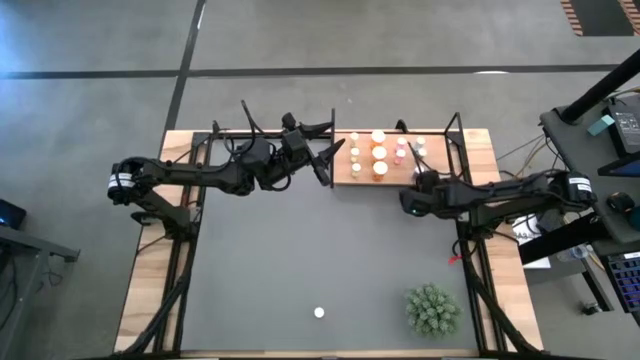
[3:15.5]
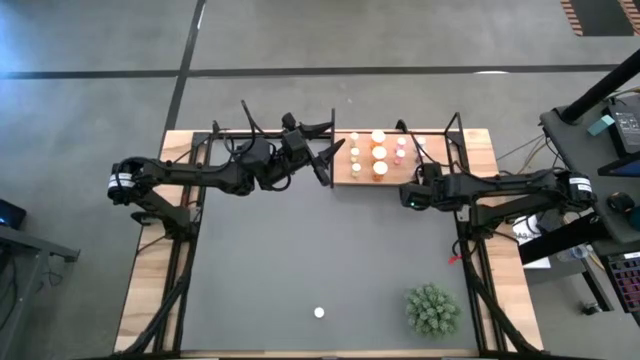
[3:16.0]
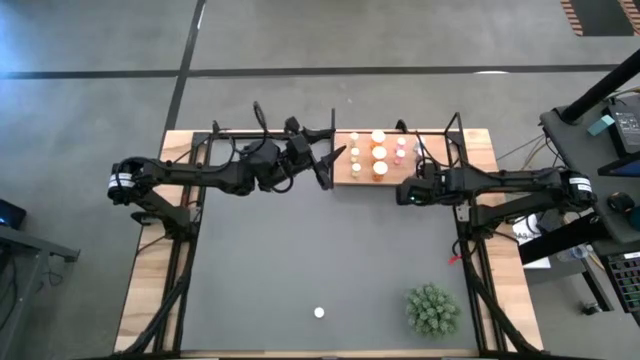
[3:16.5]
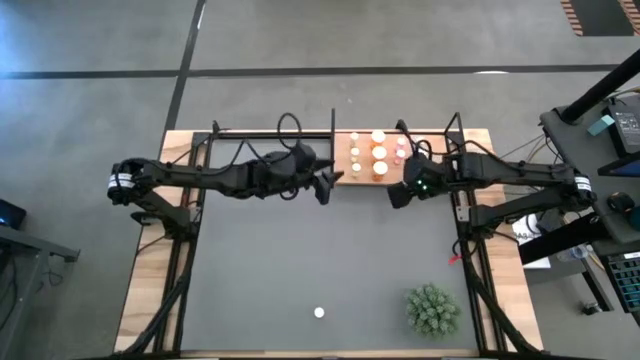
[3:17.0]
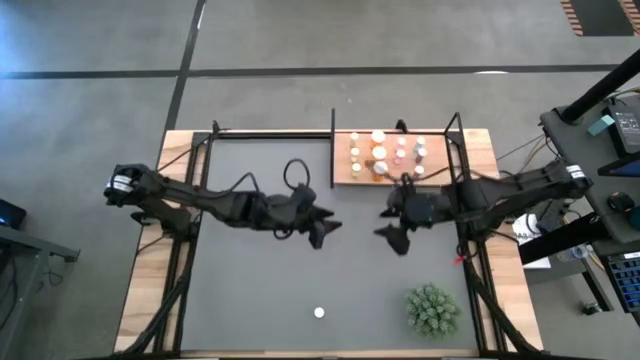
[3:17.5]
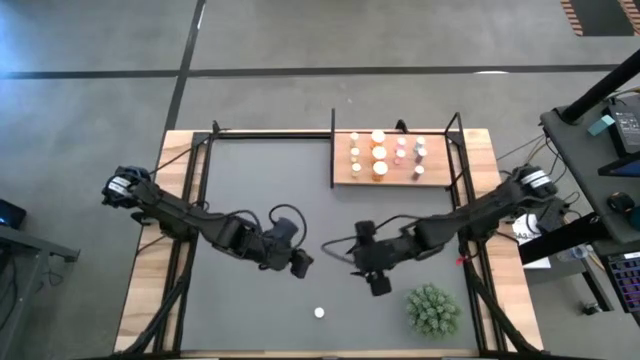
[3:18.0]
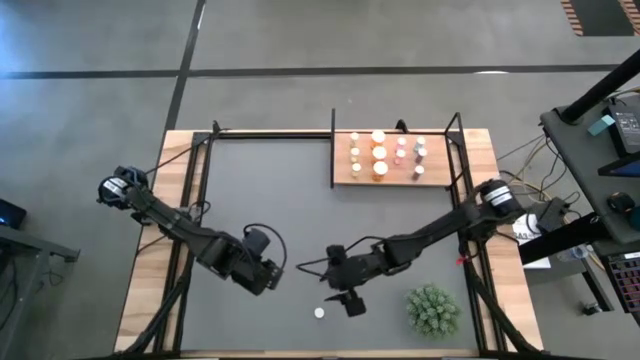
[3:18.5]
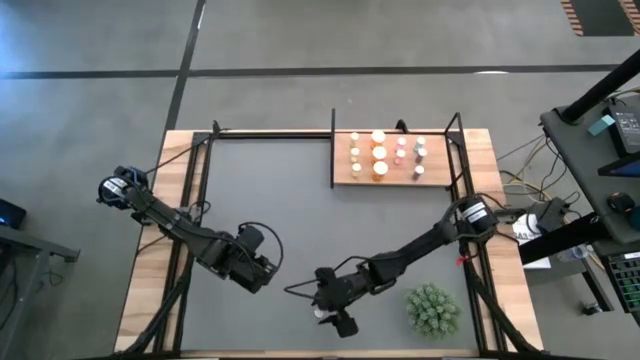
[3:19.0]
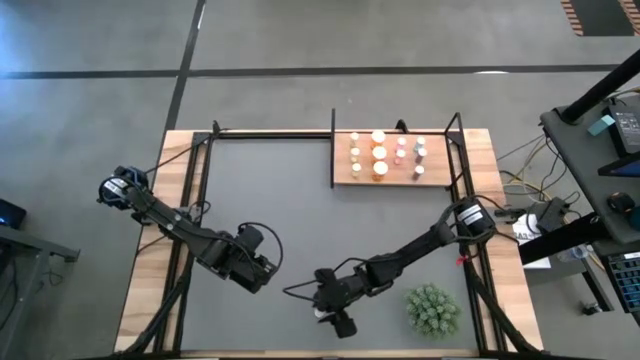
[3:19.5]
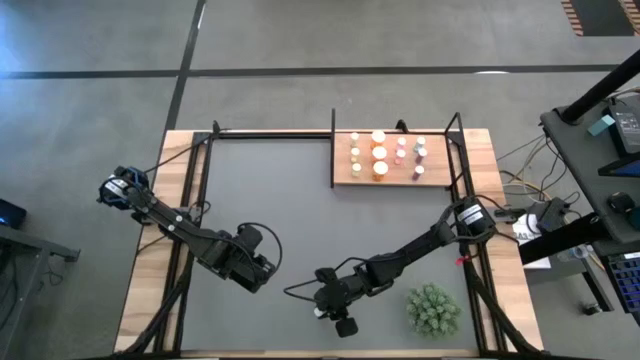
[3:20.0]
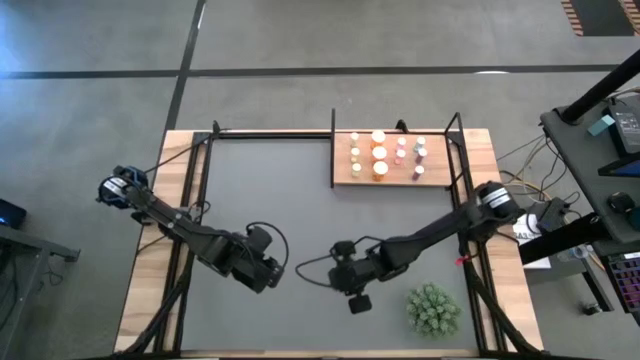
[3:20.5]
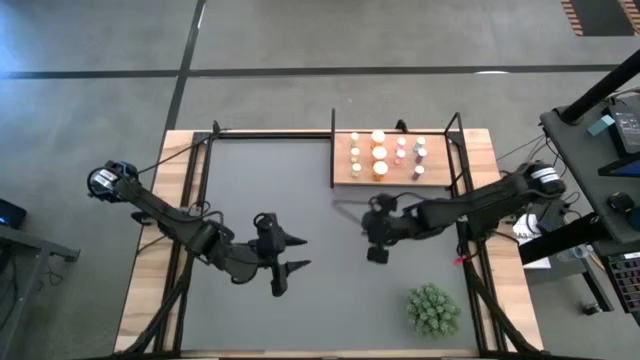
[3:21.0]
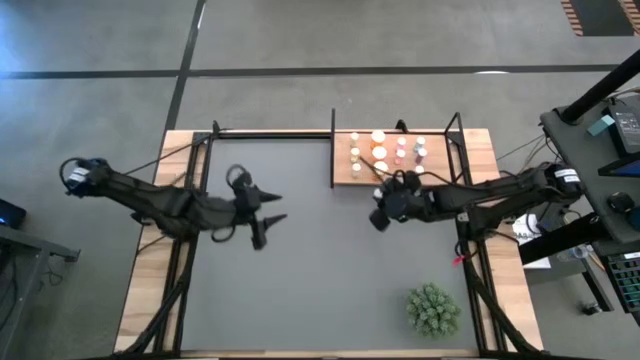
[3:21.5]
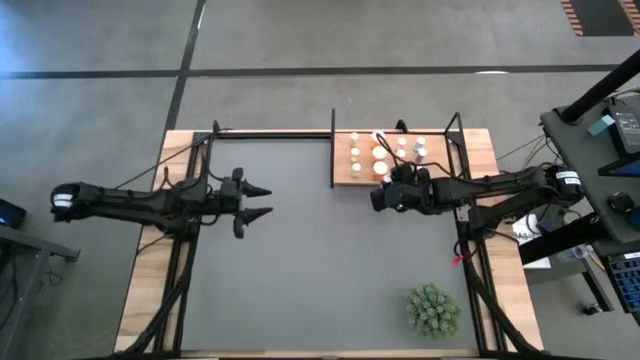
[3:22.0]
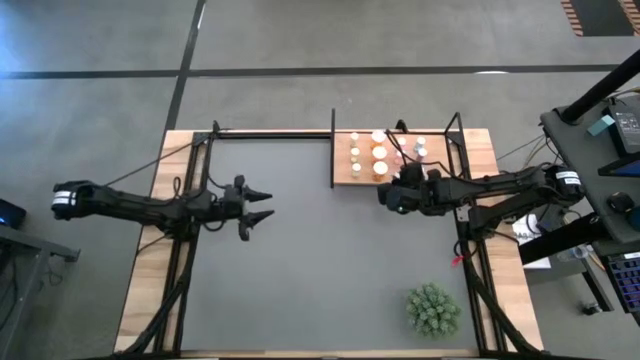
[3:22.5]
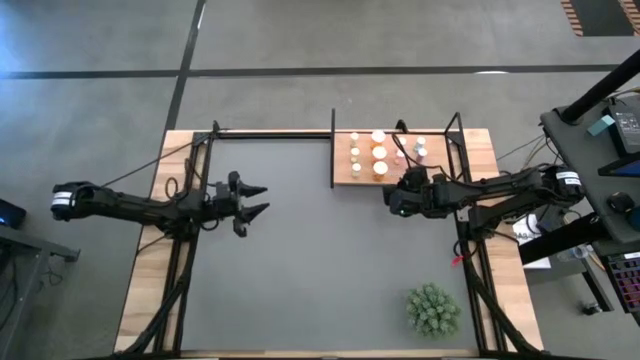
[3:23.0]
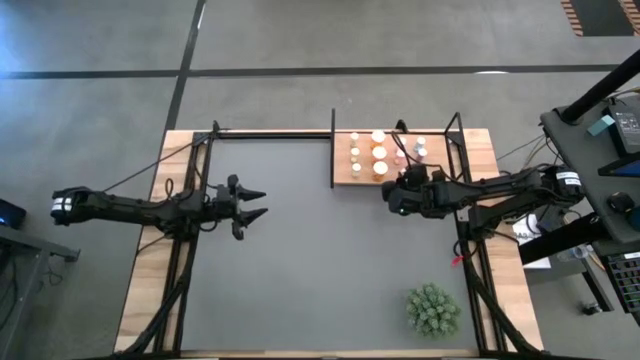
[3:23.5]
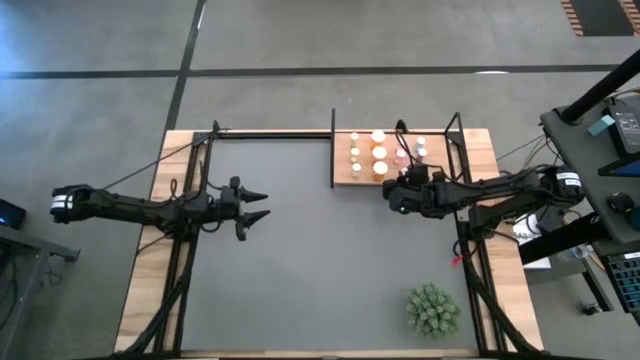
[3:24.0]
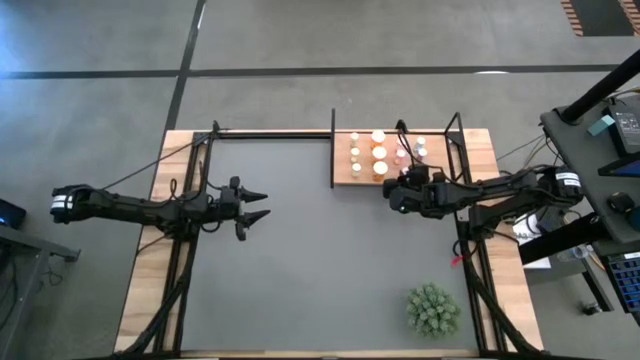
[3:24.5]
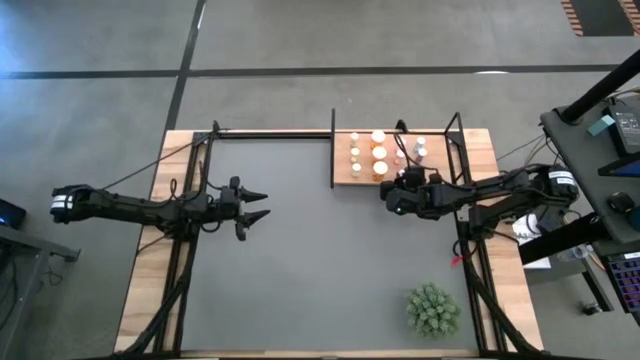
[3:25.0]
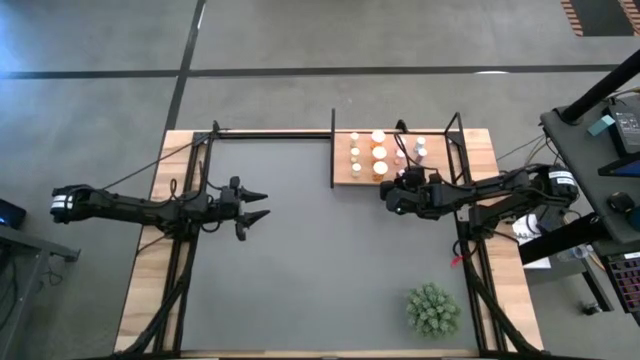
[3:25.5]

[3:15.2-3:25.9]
Task: Pick and place medicine bottles onto shelf by color
Put the pink medicine bottle on the shelf aligned with the other medicine bottle

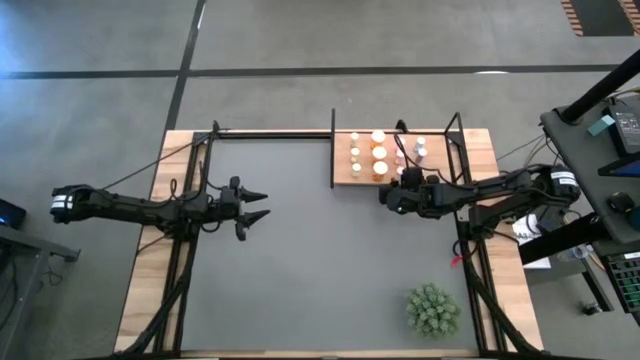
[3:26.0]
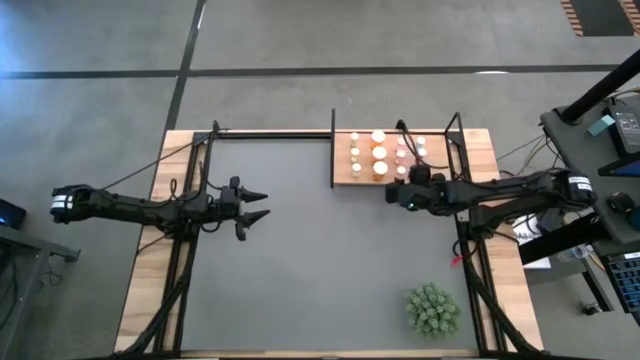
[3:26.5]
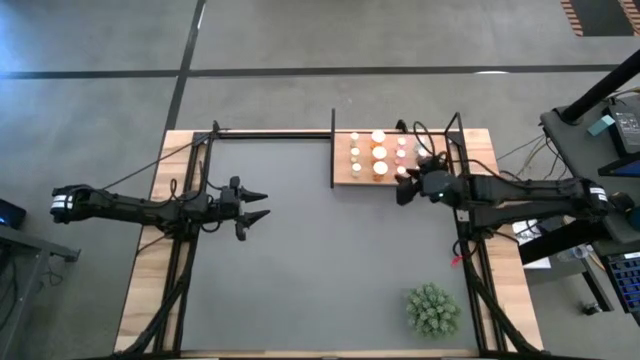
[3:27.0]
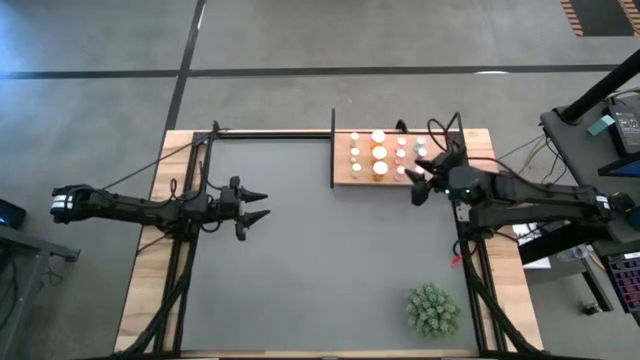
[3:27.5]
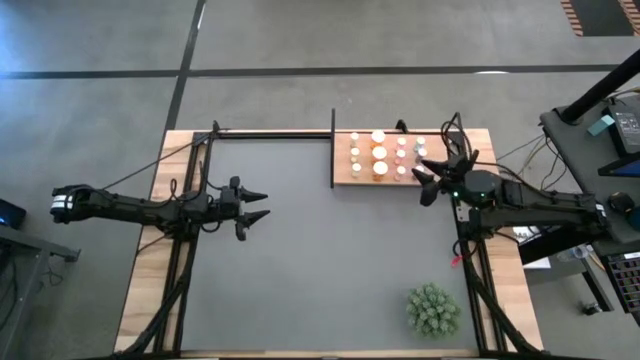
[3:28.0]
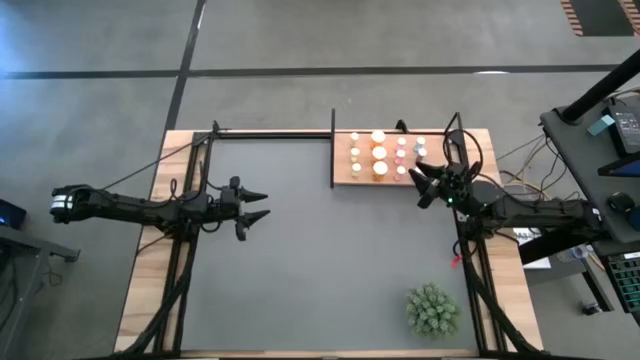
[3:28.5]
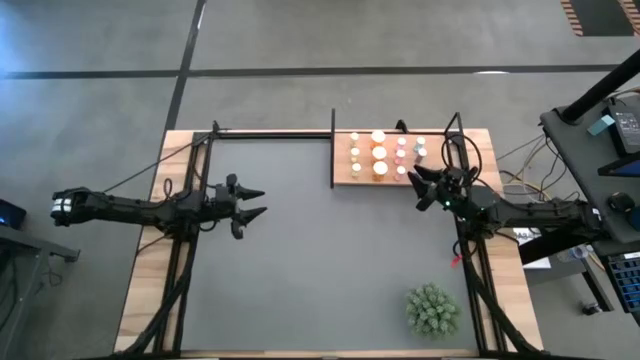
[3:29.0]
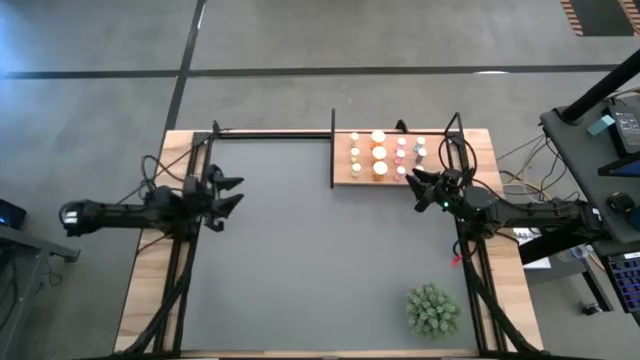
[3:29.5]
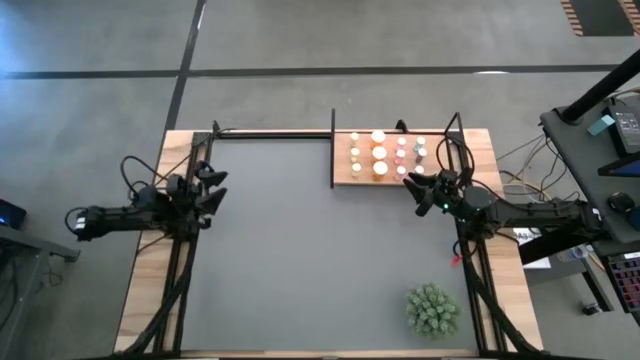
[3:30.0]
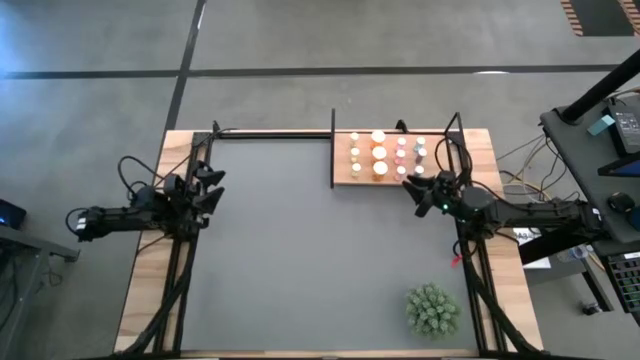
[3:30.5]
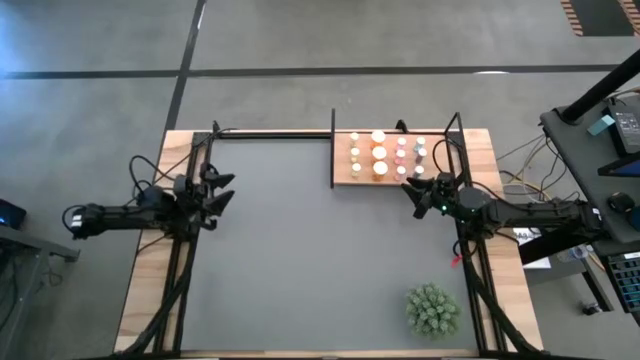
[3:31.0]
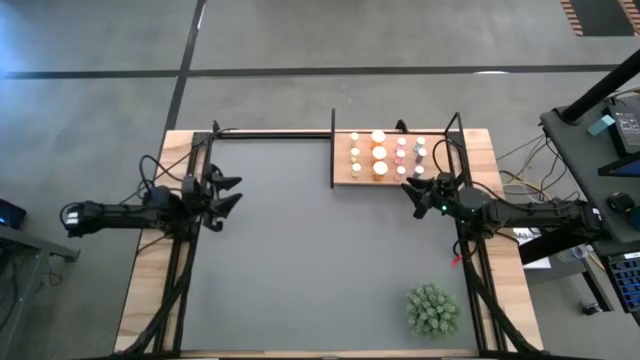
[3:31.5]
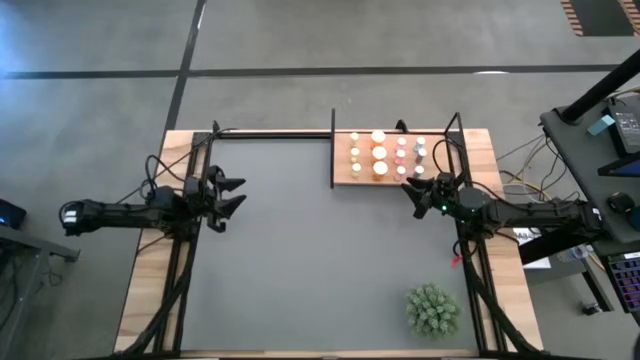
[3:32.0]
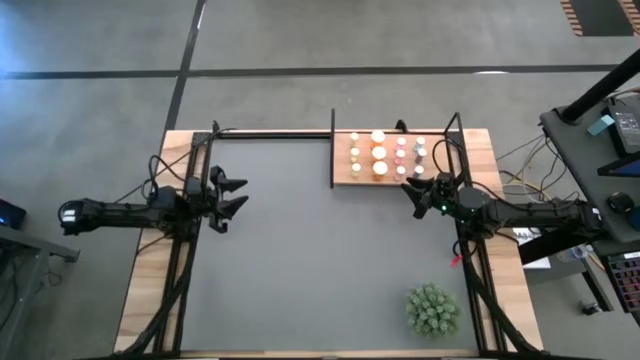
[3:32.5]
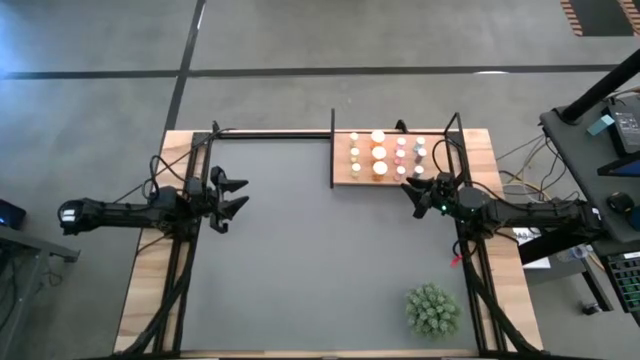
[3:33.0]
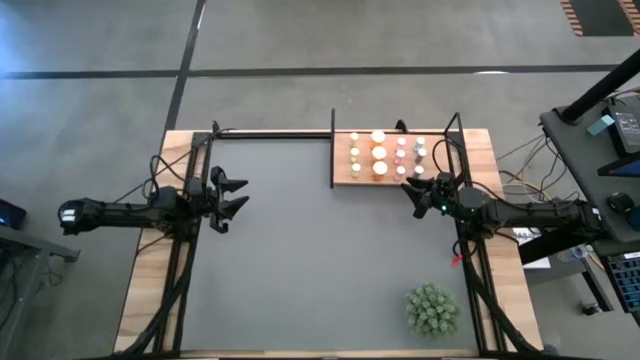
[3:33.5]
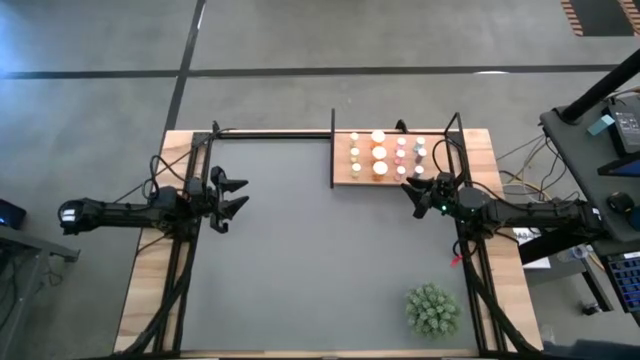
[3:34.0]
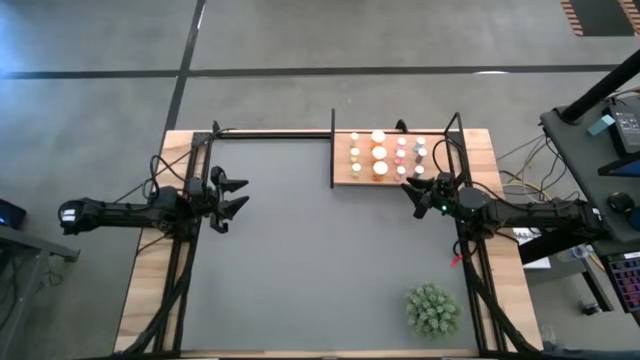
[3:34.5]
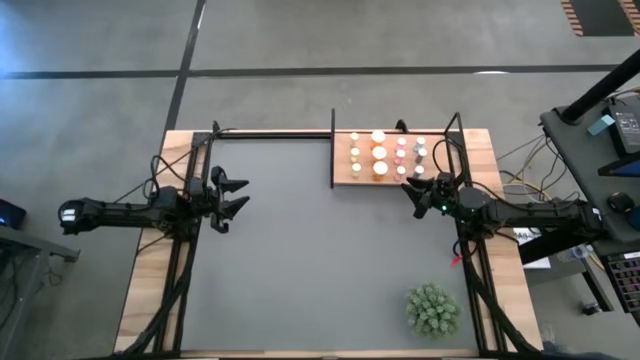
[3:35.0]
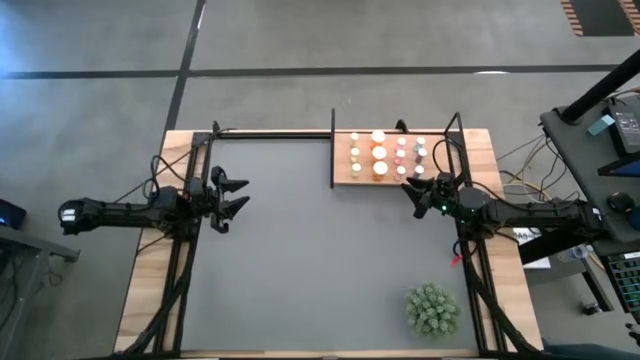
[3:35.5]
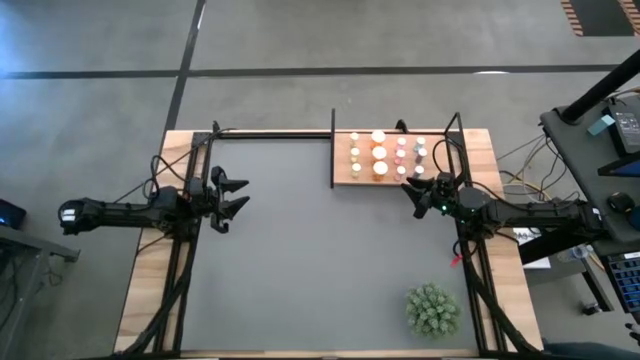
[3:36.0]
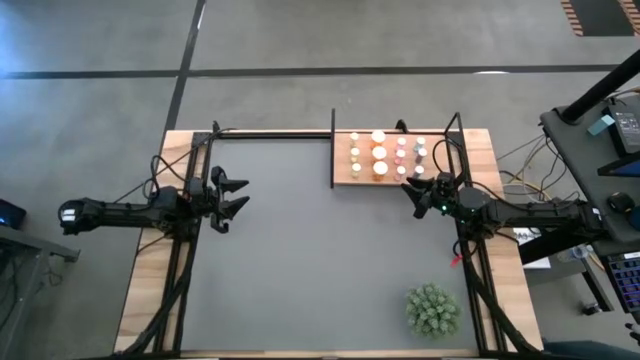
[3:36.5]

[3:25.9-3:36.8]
Return to Home Position
